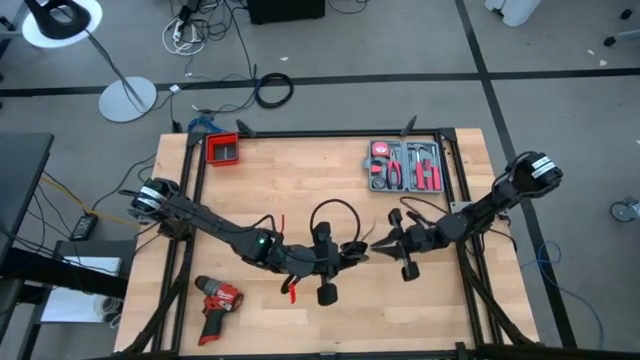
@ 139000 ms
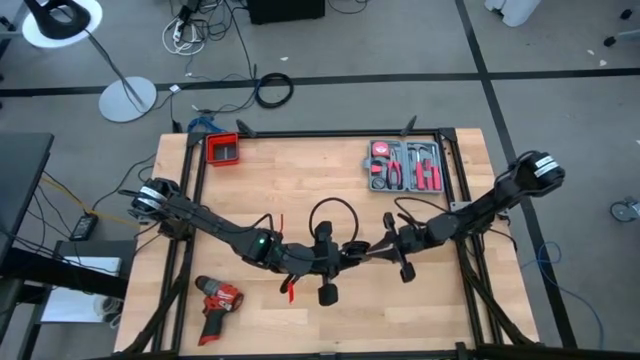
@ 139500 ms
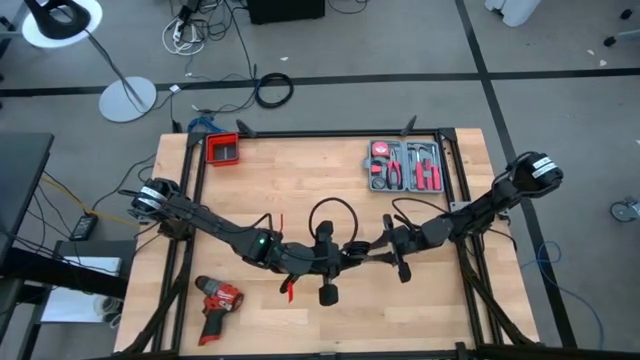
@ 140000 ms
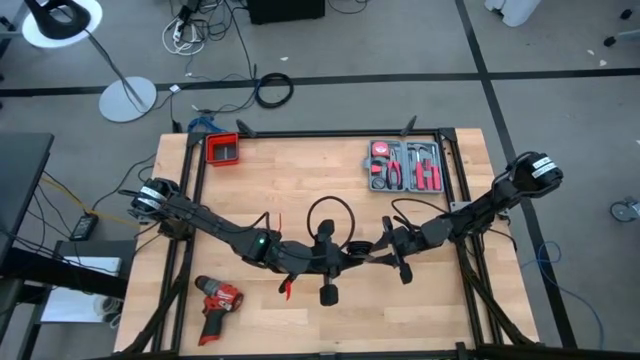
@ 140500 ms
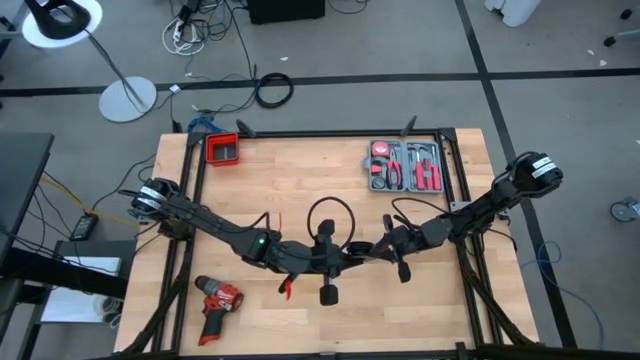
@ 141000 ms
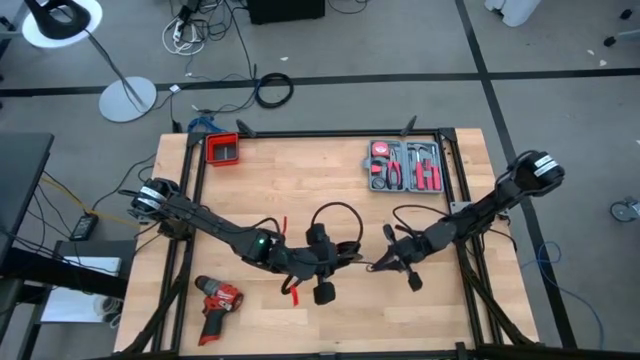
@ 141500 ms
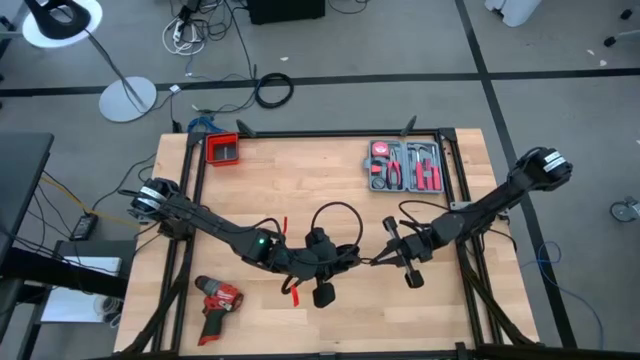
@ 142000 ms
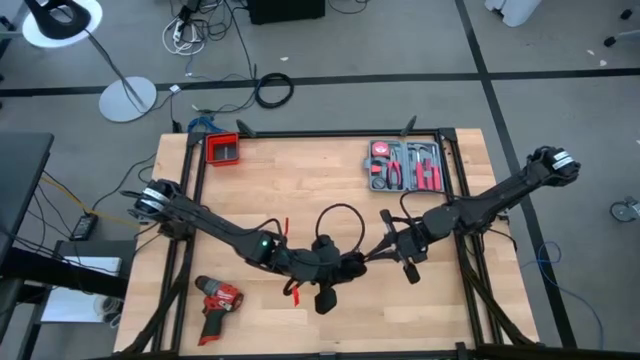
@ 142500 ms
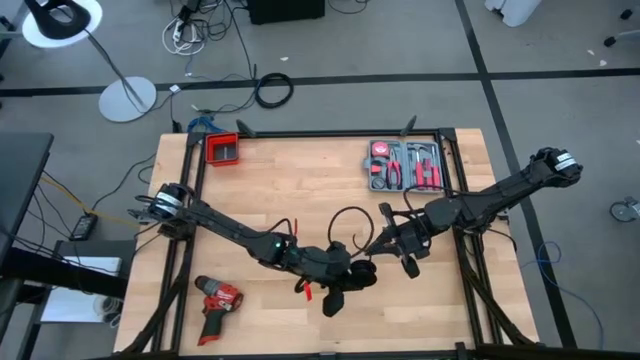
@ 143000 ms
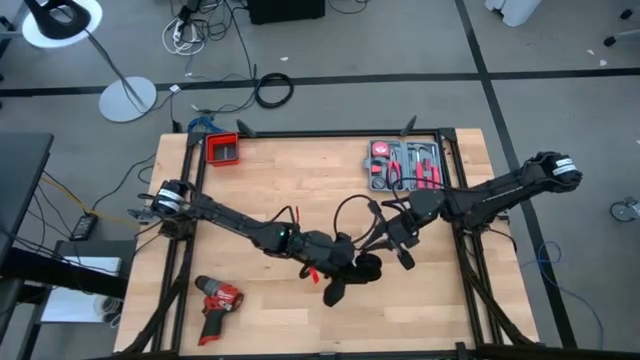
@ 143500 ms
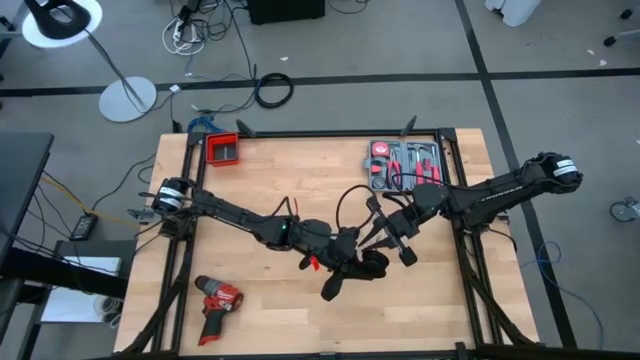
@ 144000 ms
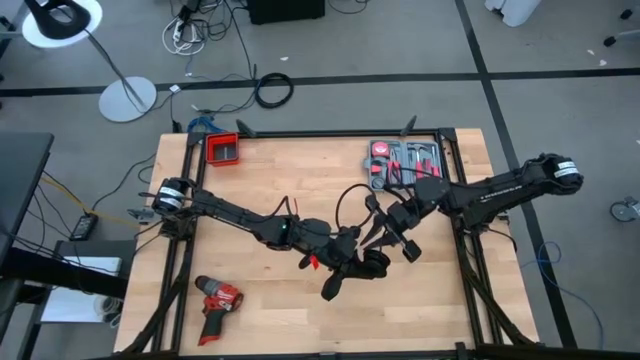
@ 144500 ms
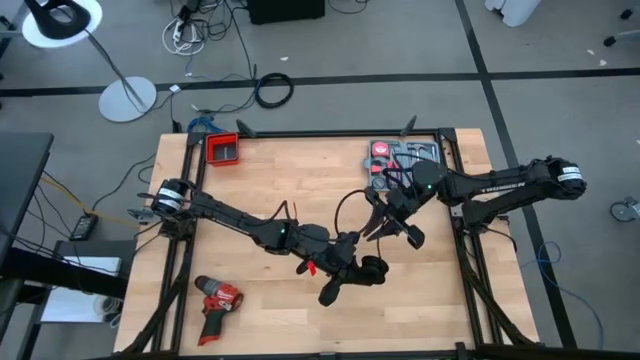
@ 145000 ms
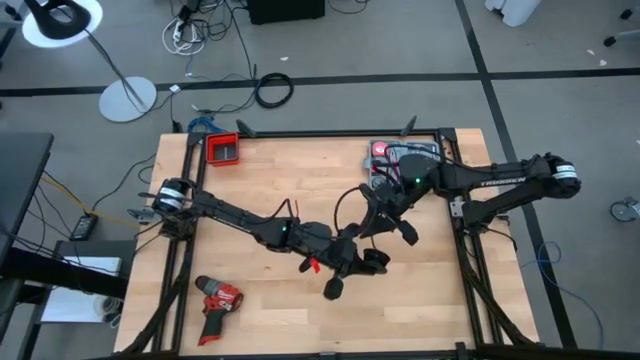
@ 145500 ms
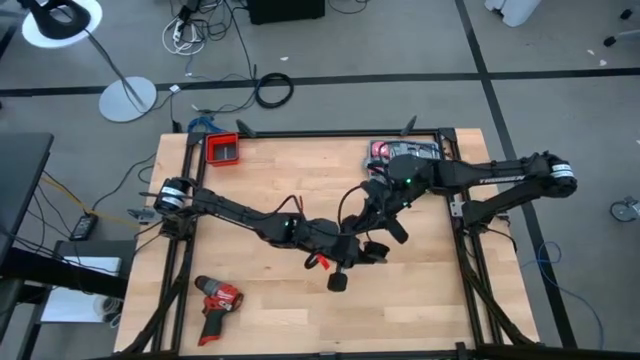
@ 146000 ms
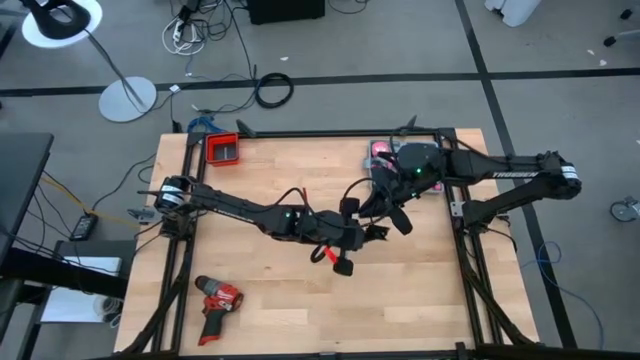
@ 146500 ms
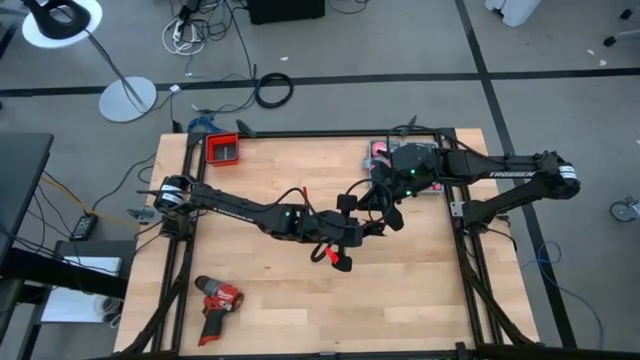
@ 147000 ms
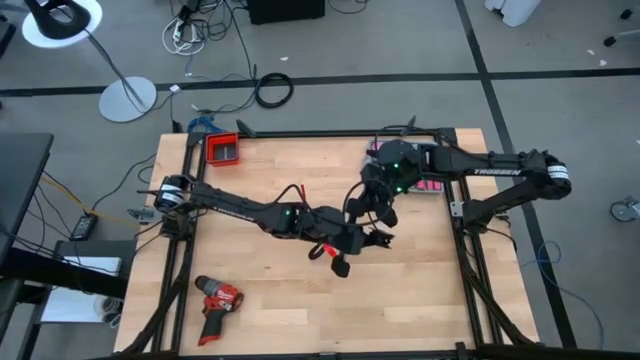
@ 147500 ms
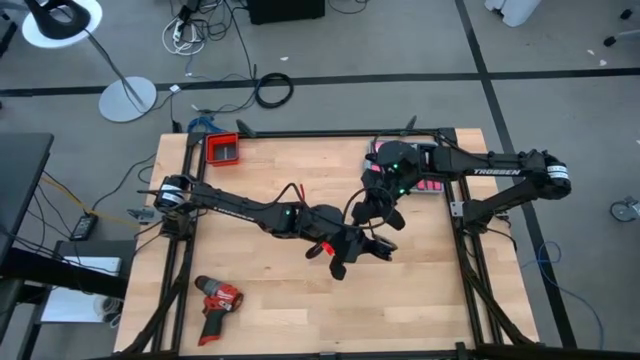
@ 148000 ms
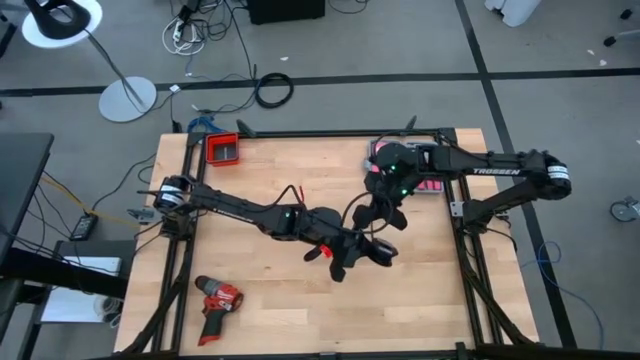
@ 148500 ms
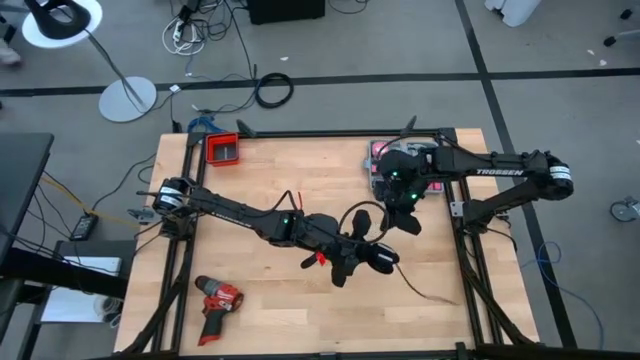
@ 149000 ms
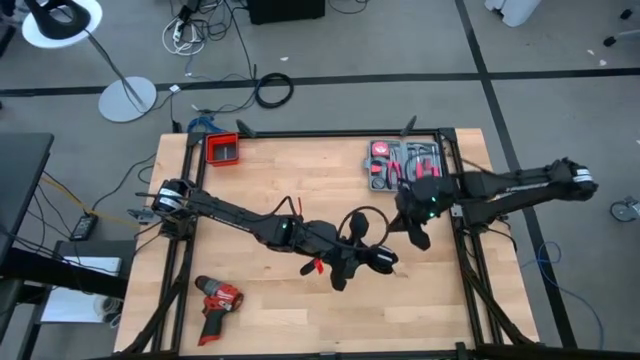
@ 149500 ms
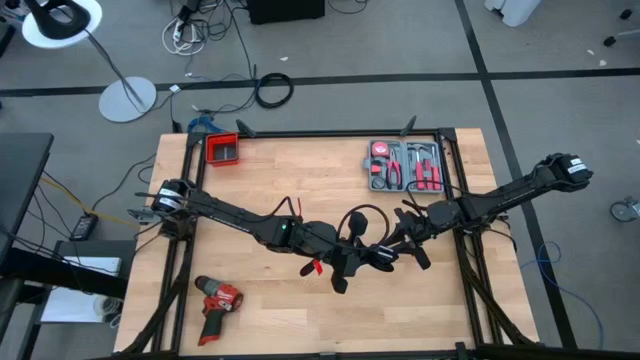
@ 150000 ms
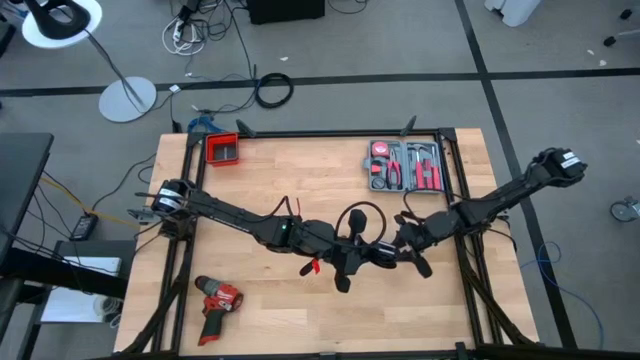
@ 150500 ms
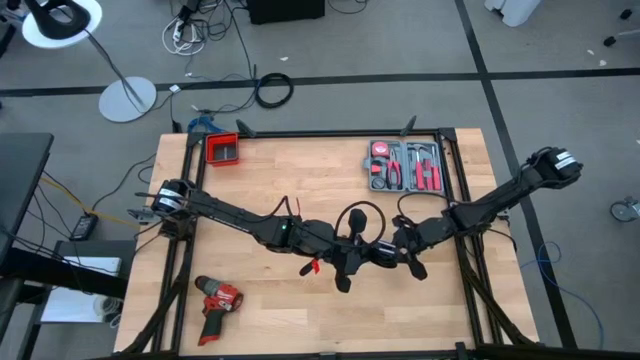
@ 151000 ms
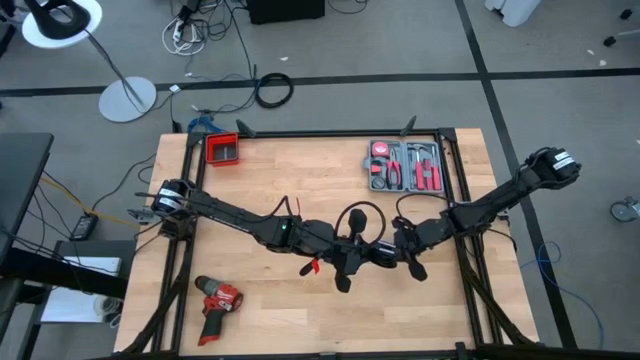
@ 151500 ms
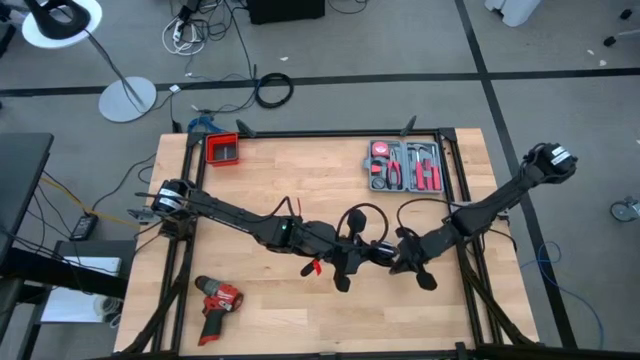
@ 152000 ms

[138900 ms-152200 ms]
Task: Coil cords
Coil the black wire onto the black spool

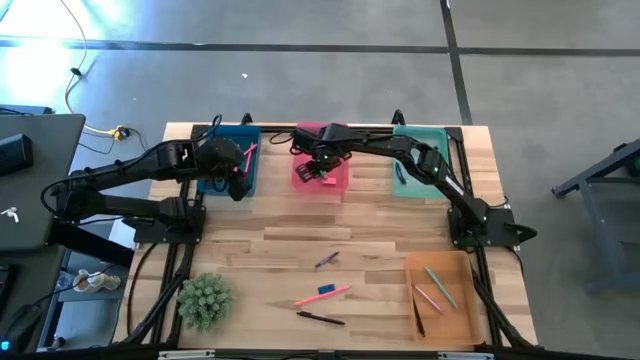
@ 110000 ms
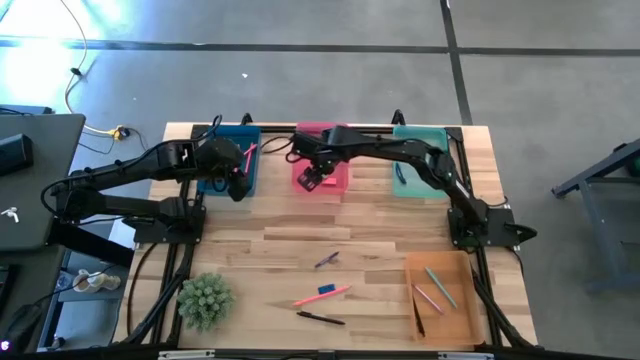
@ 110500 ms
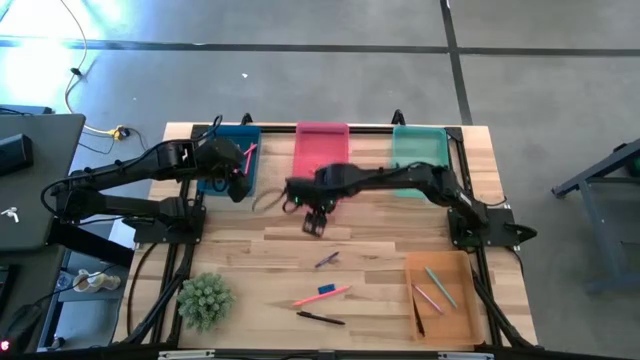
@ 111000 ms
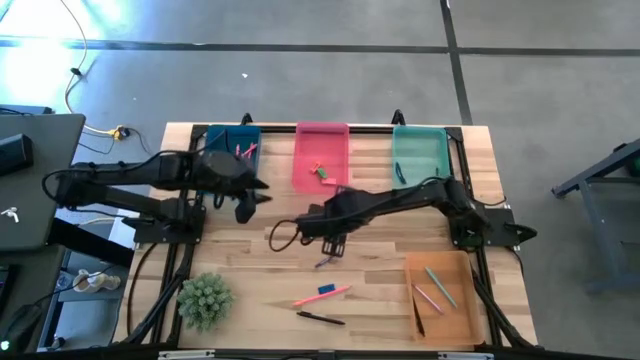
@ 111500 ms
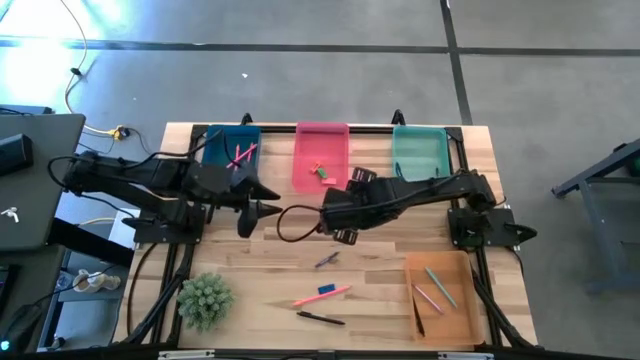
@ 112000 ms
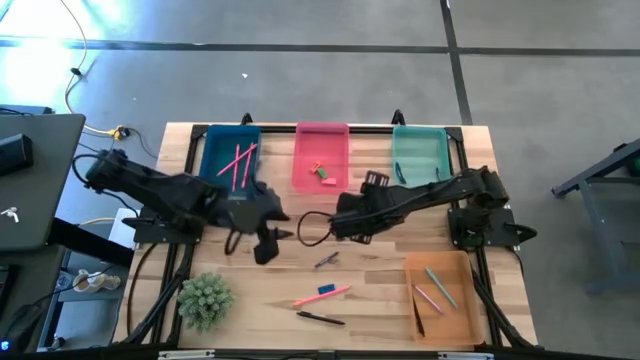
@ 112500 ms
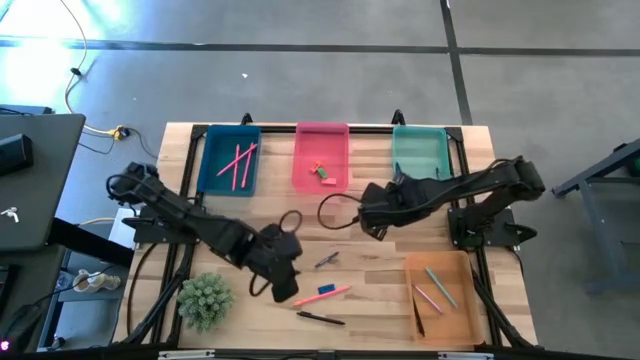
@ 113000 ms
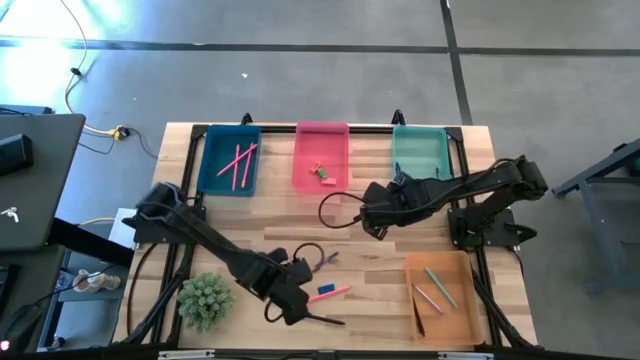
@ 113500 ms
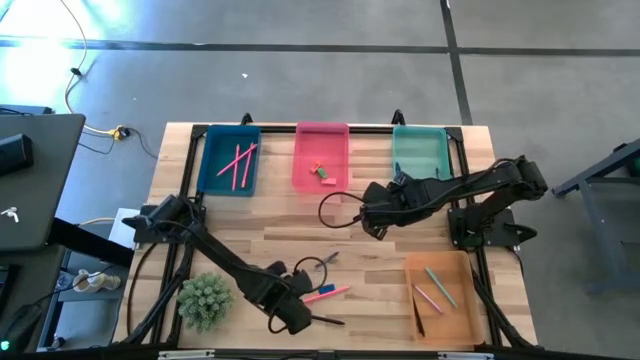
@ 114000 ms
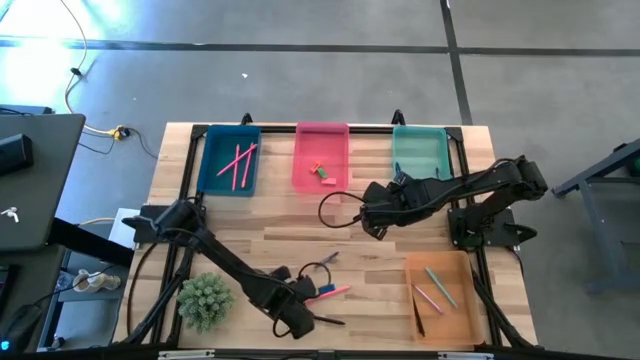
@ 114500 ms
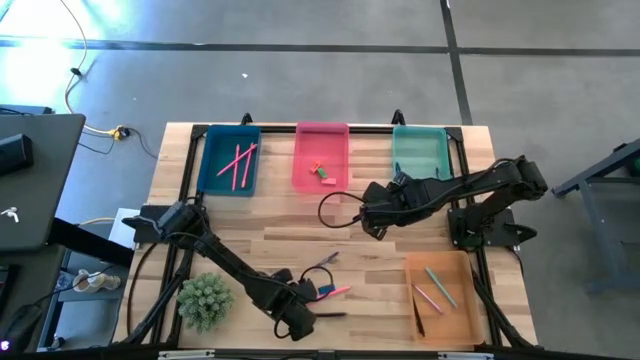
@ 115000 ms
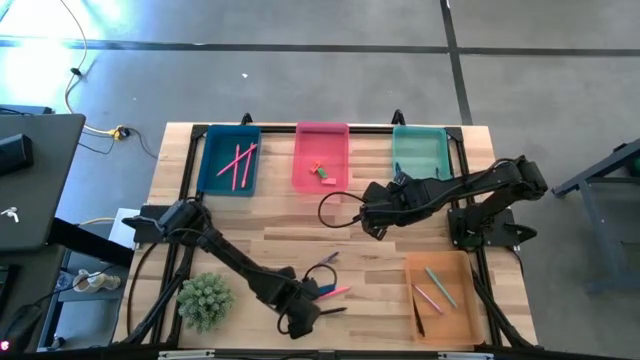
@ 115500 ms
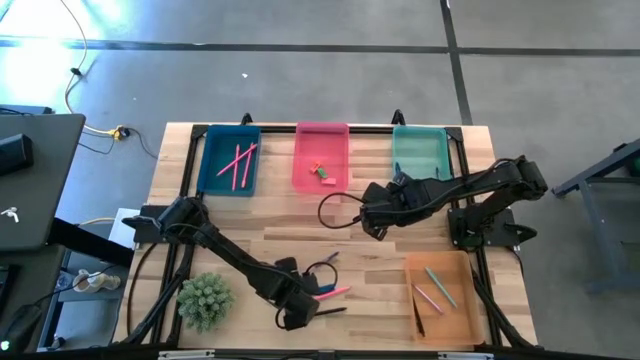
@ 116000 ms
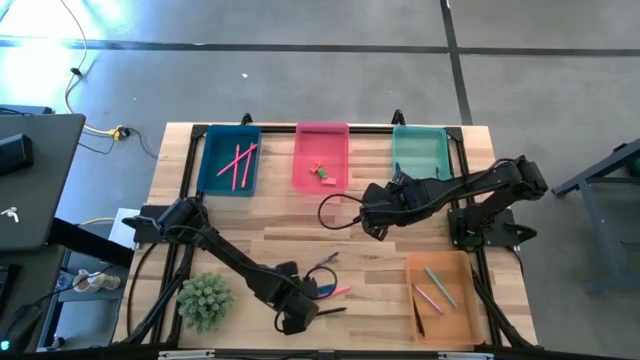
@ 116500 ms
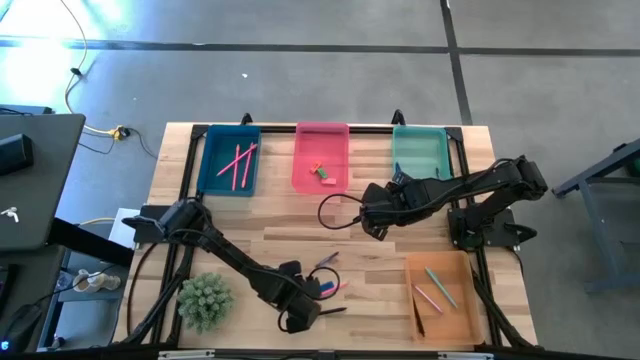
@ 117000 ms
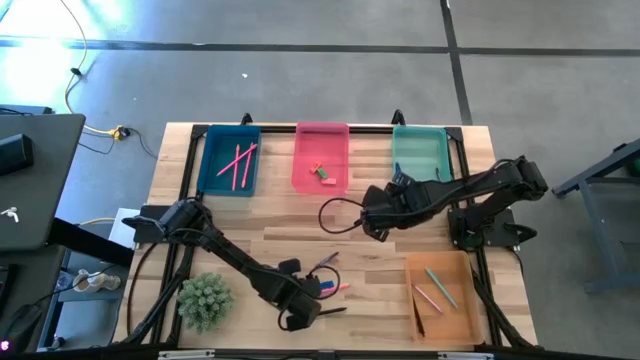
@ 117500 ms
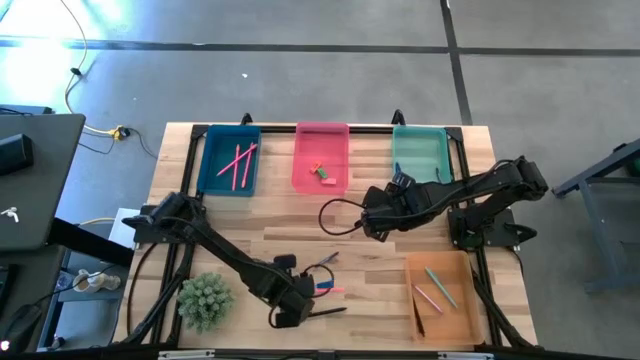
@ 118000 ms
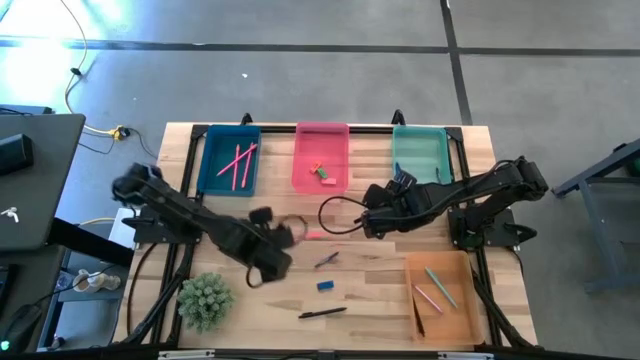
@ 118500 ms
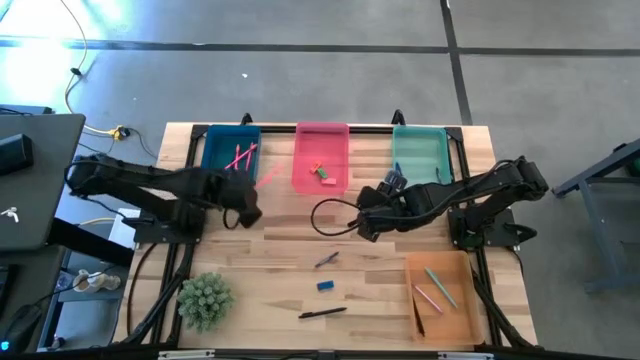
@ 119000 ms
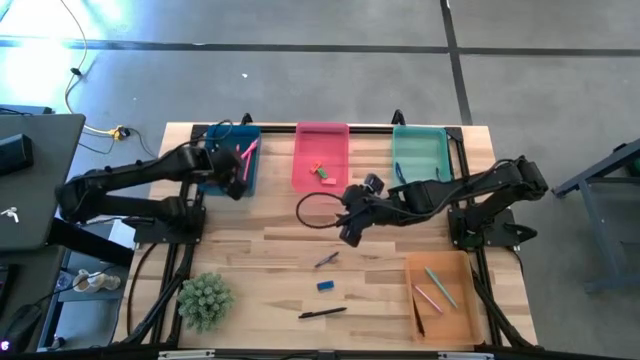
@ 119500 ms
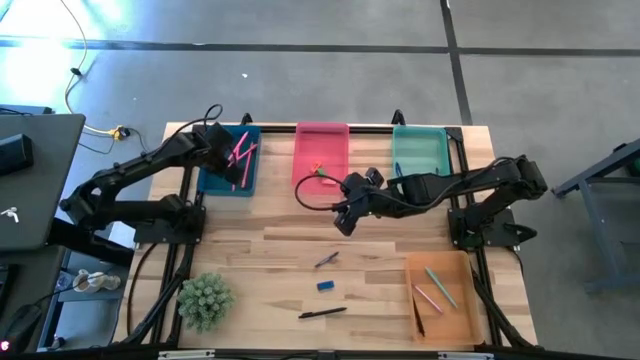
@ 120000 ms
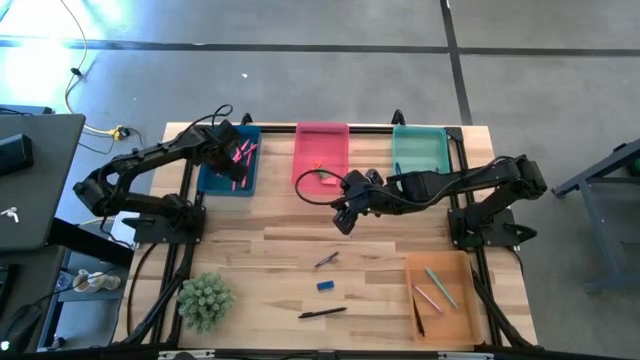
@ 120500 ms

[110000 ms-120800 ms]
Task: Sort crayons/erasers/pens/pencils in bins
Put the pink pencil into the blue bin
